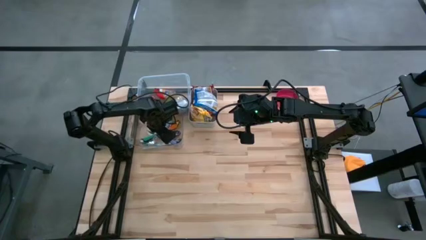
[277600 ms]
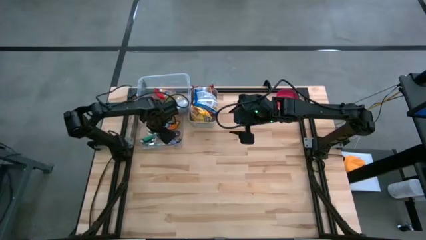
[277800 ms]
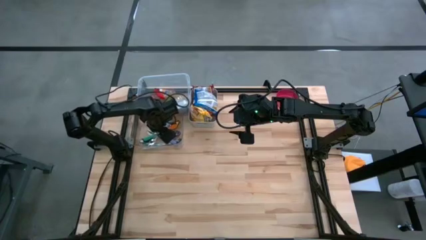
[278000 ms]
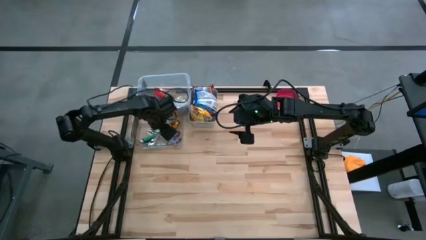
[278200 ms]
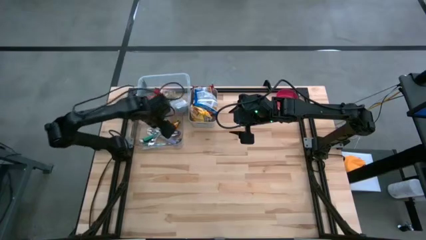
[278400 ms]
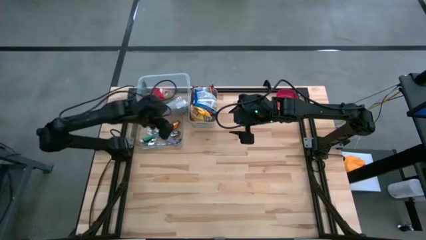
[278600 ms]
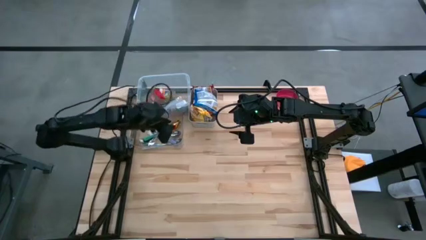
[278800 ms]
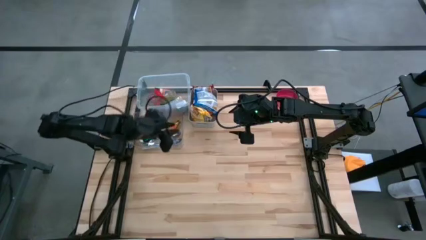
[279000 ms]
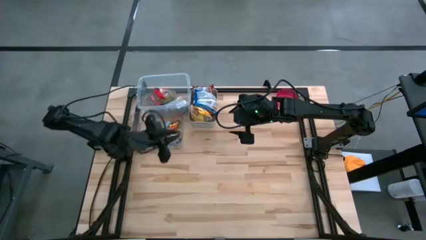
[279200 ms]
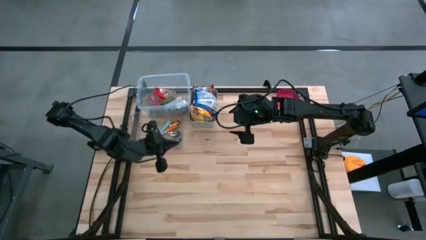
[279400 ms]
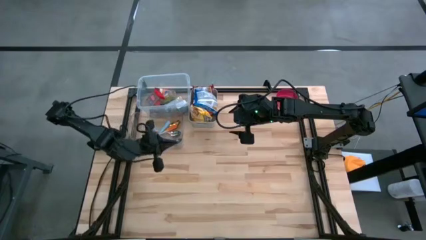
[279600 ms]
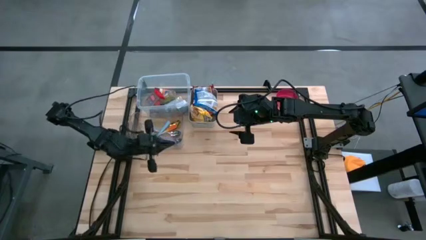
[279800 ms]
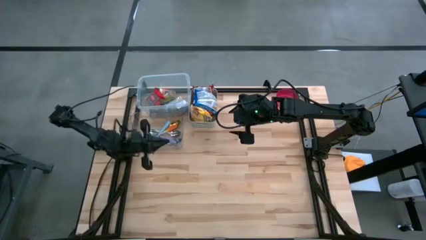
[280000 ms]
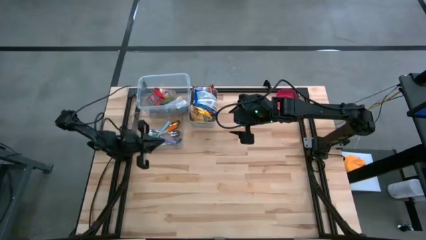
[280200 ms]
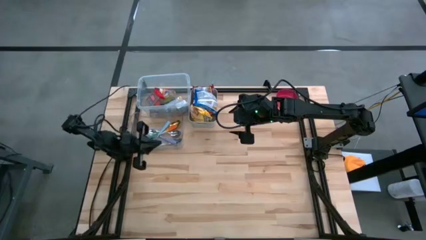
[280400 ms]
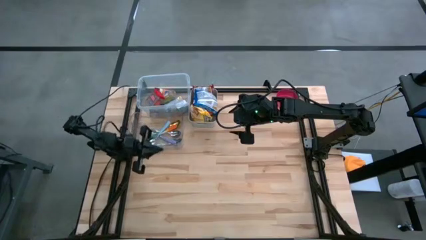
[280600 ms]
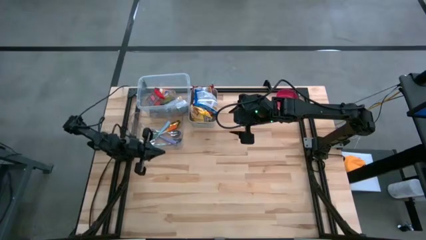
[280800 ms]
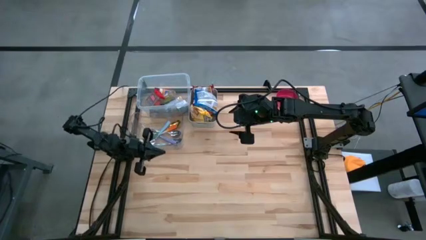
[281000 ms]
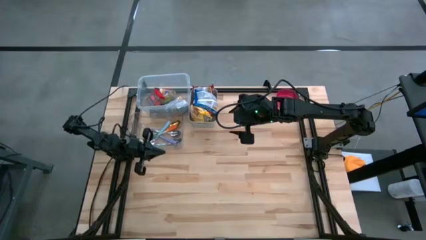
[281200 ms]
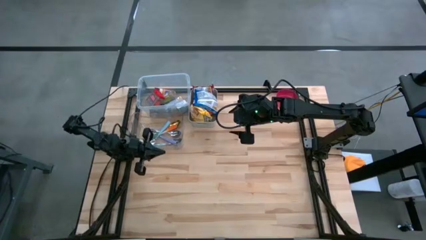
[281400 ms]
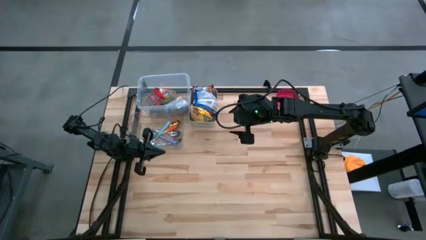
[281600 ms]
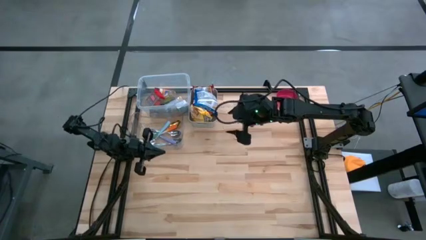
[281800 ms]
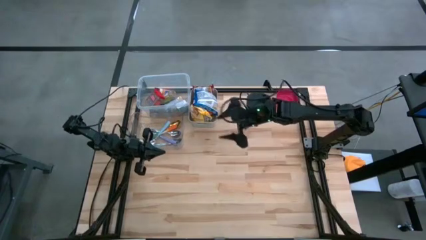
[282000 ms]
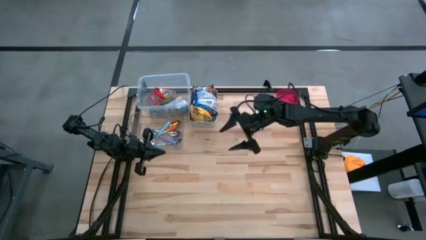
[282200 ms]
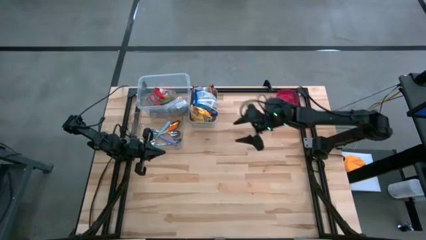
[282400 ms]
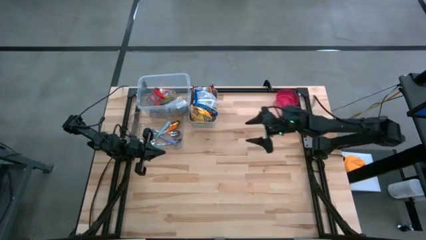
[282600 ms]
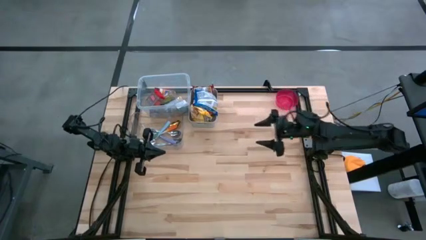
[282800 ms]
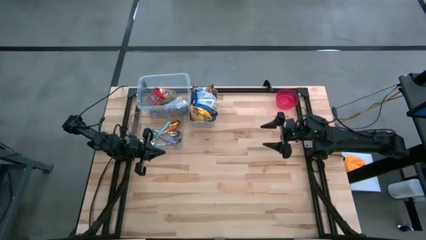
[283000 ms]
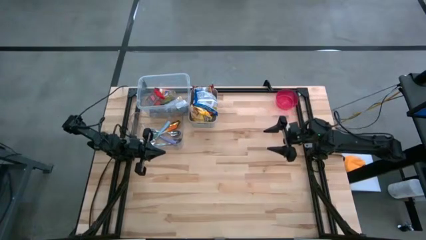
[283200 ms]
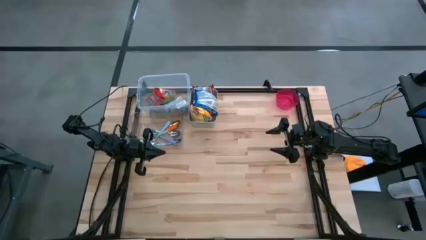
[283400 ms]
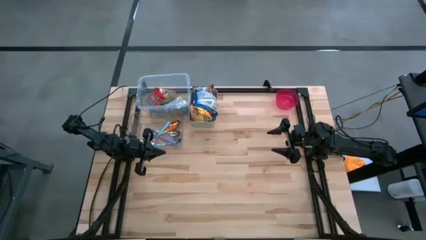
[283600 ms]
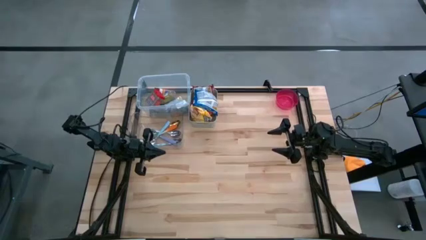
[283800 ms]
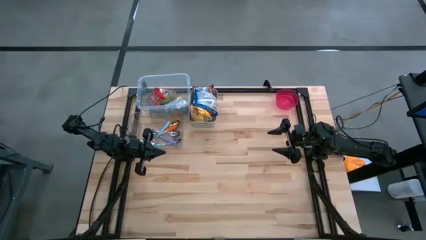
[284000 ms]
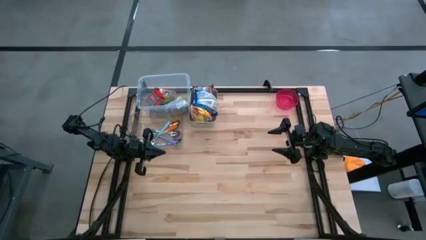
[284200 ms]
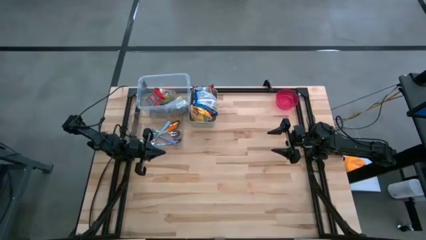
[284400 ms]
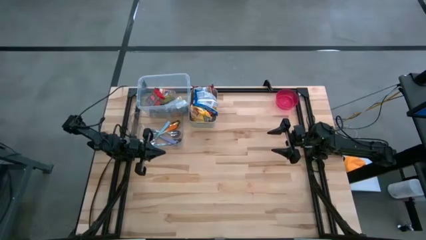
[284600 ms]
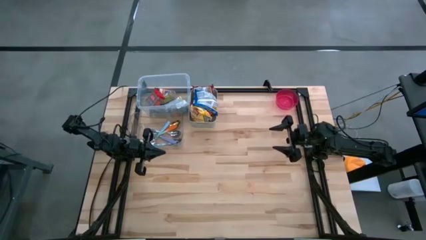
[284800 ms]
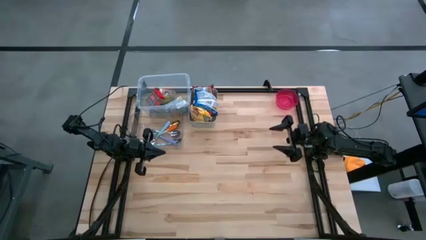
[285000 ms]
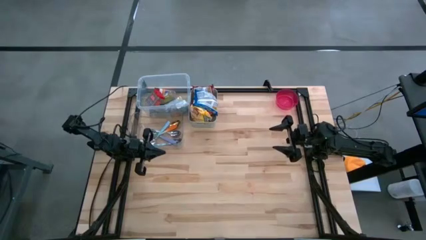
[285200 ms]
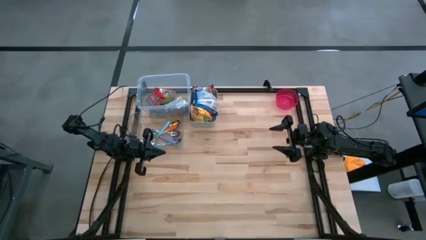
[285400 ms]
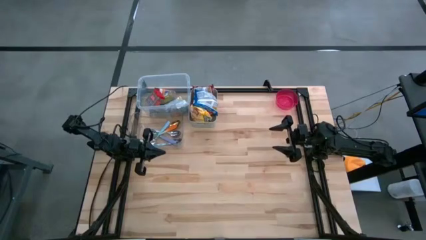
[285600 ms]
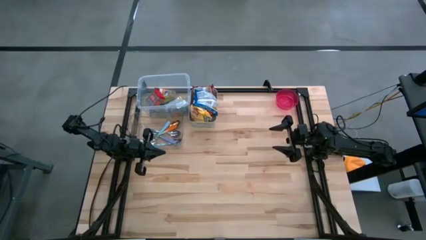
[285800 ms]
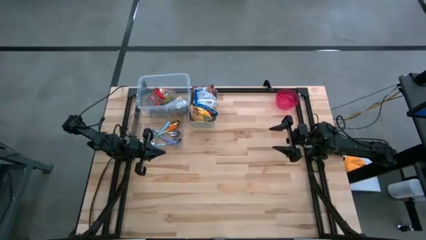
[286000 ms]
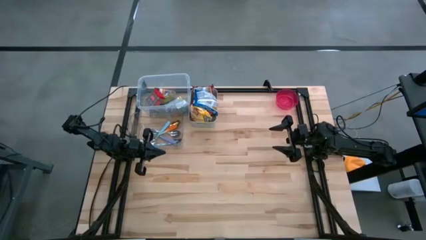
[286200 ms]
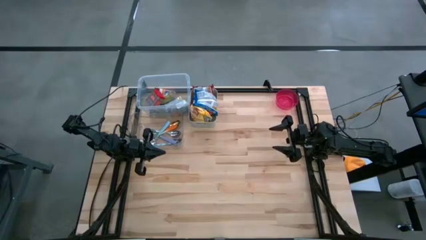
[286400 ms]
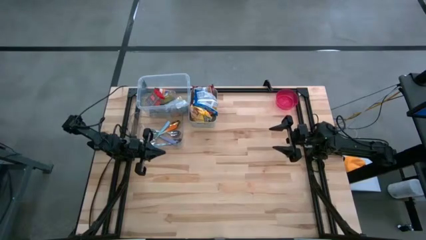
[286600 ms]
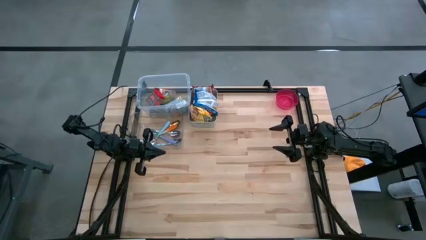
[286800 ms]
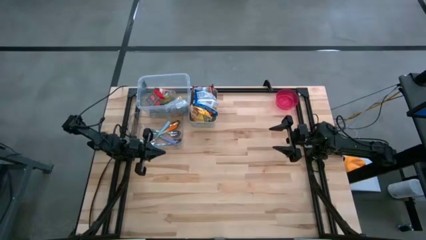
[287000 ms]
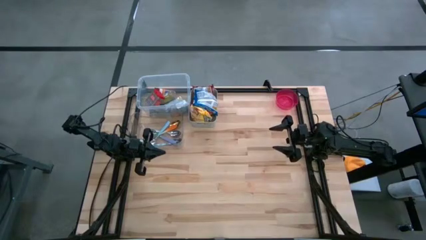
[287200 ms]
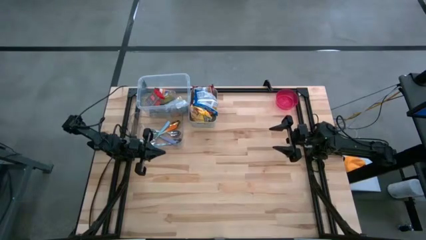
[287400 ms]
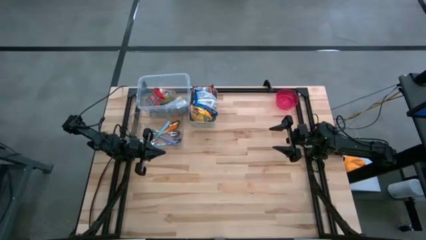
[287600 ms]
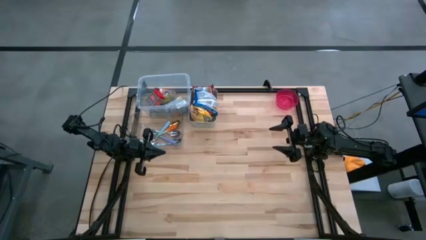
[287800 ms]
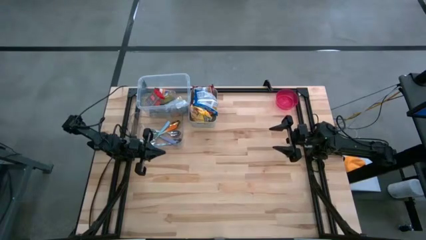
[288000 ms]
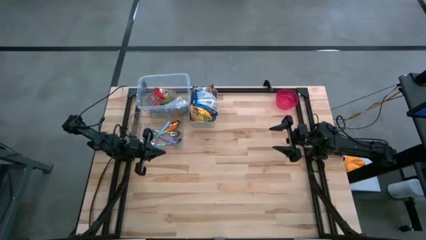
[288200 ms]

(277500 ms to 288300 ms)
Return to Home Position
